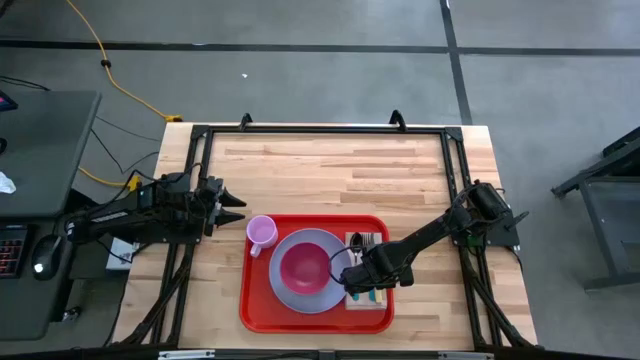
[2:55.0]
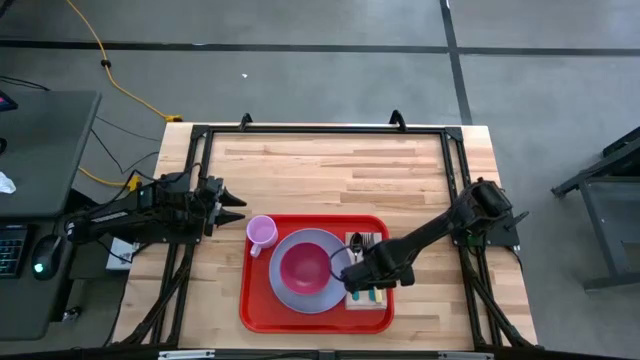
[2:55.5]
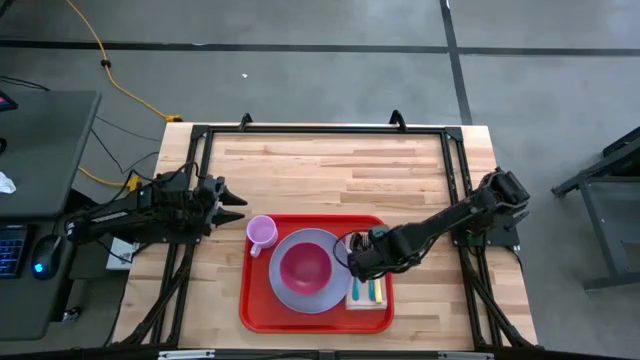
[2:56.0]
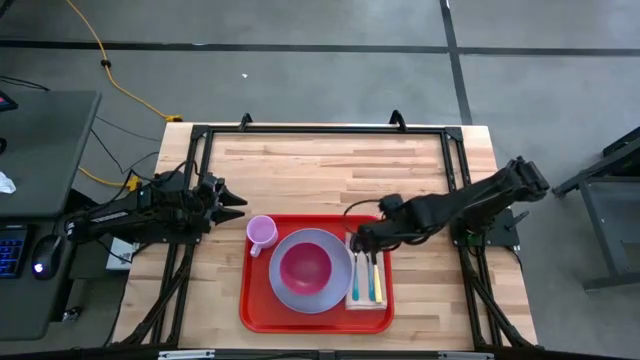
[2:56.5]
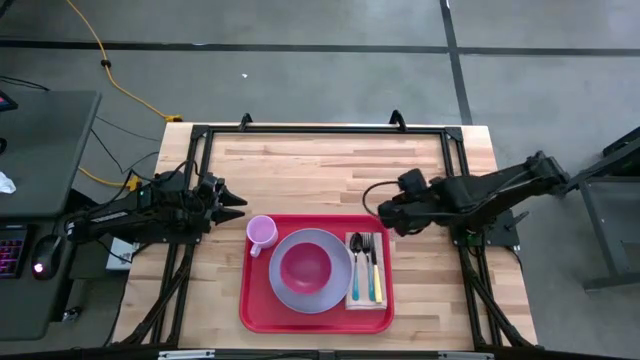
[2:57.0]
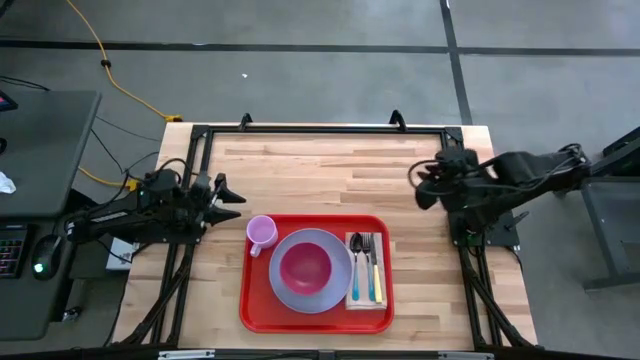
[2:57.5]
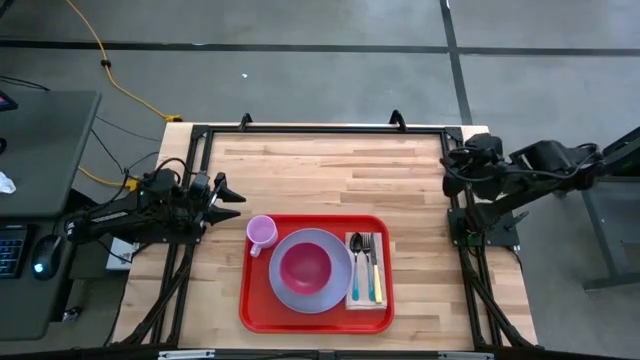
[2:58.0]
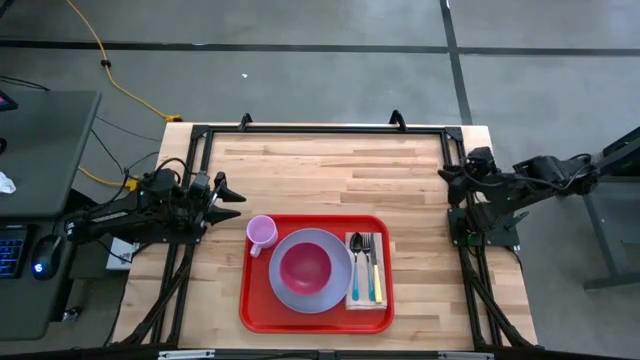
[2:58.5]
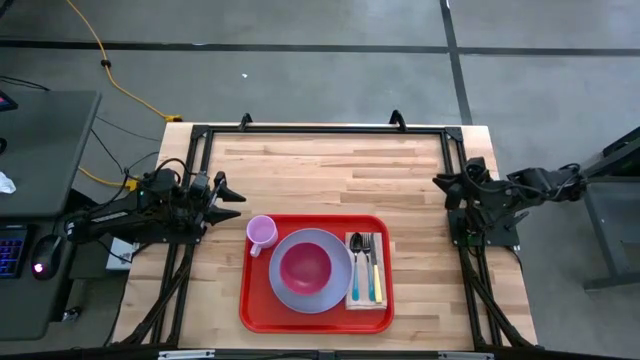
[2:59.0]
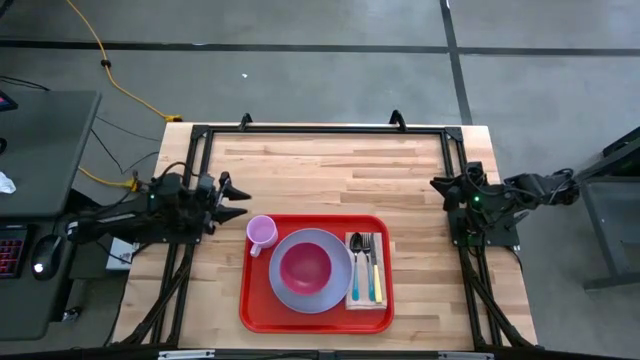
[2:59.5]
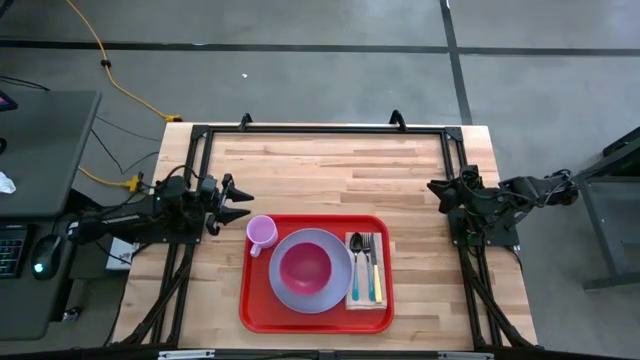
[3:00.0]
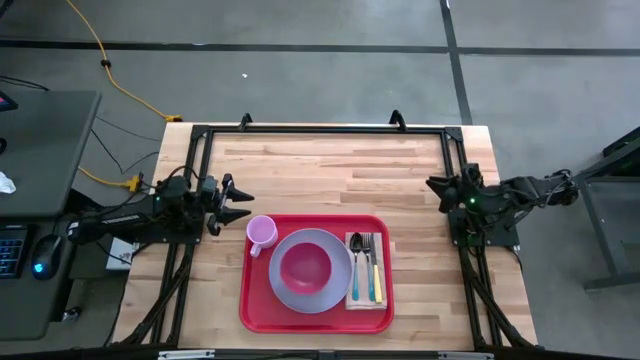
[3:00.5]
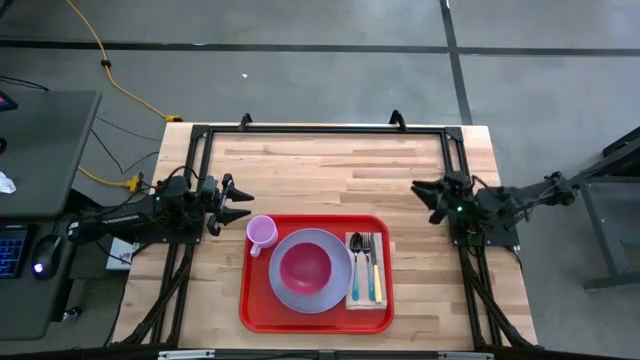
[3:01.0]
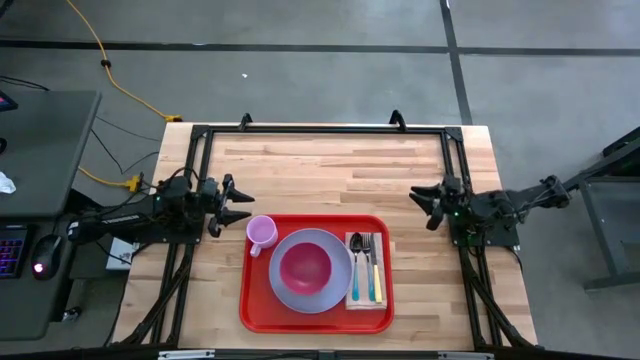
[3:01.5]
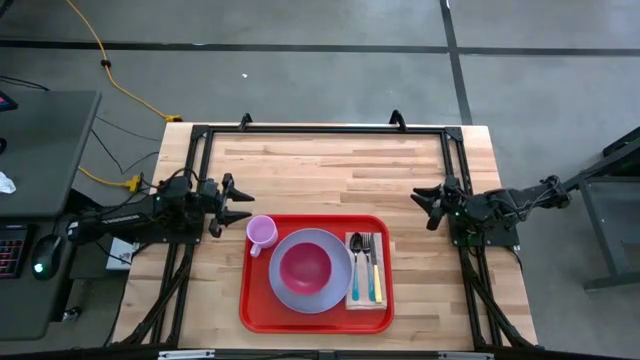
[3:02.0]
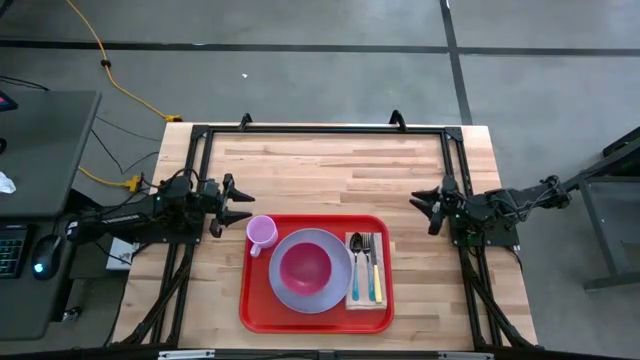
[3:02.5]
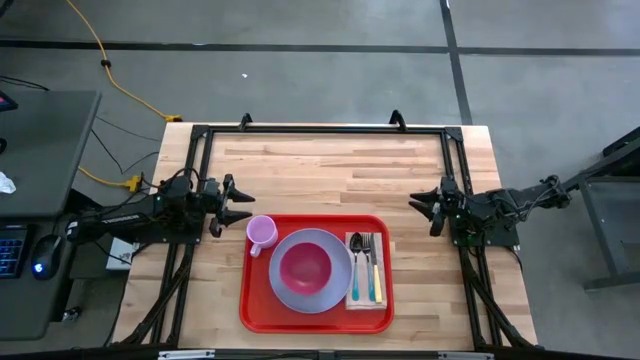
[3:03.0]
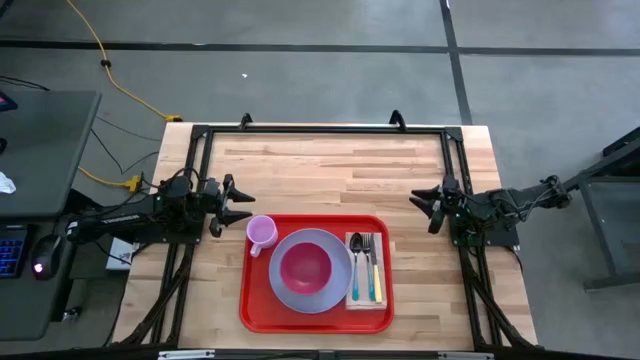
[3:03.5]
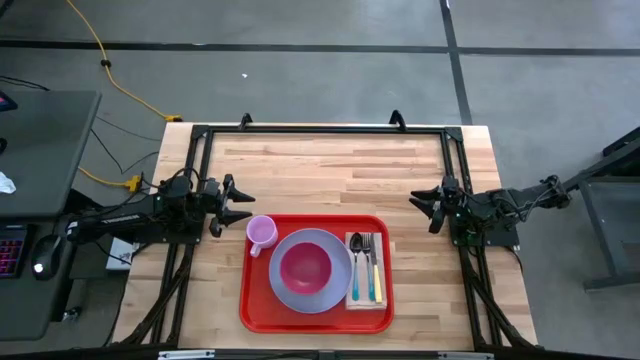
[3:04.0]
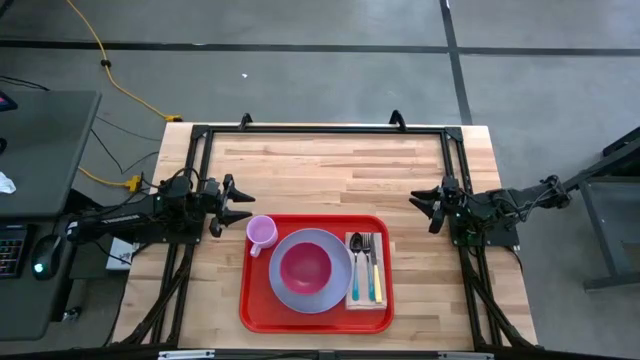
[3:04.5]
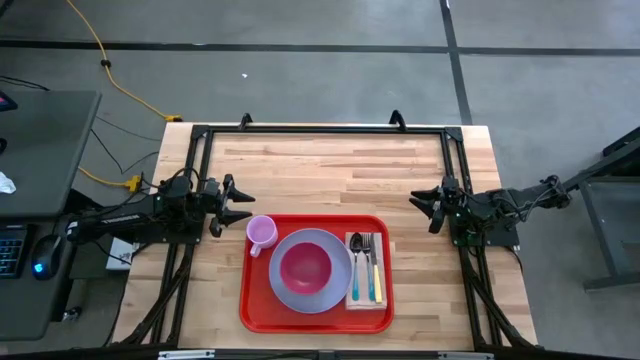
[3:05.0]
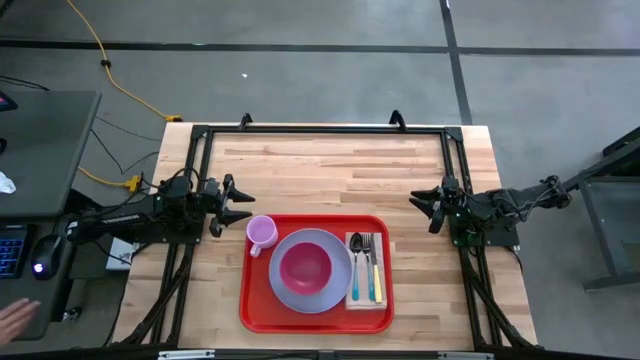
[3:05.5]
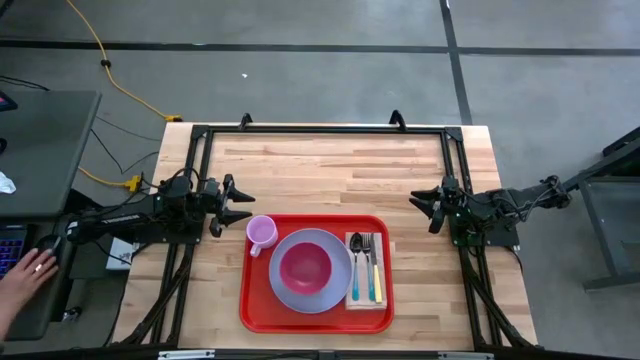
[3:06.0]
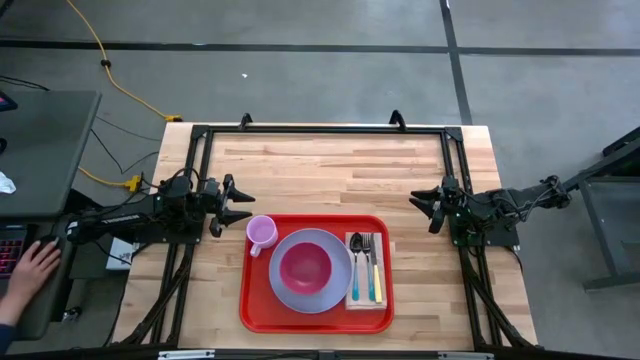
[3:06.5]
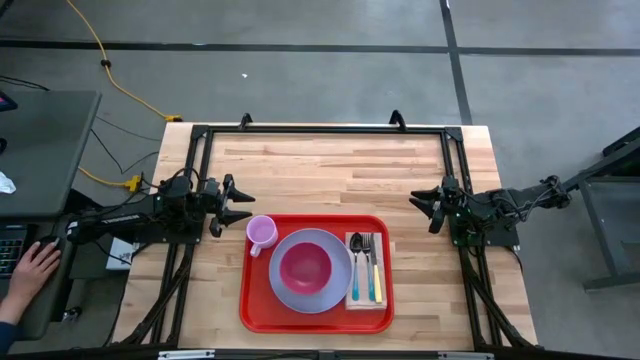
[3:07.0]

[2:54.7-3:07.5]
Task: Set up tray
Return to Home Position

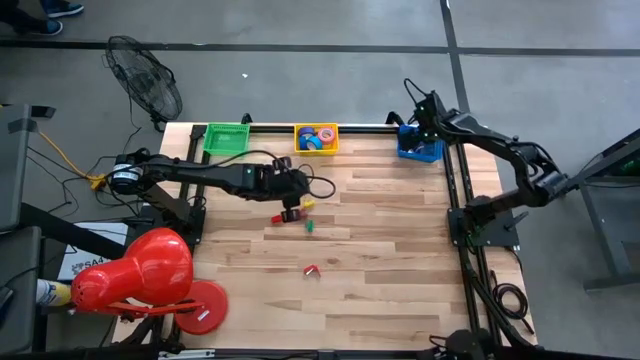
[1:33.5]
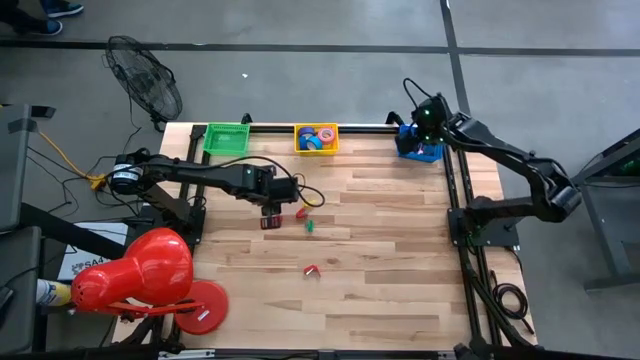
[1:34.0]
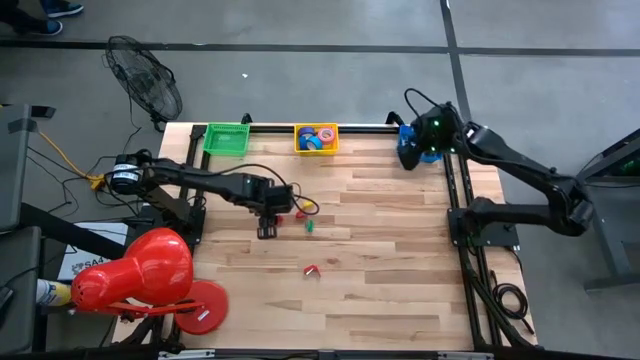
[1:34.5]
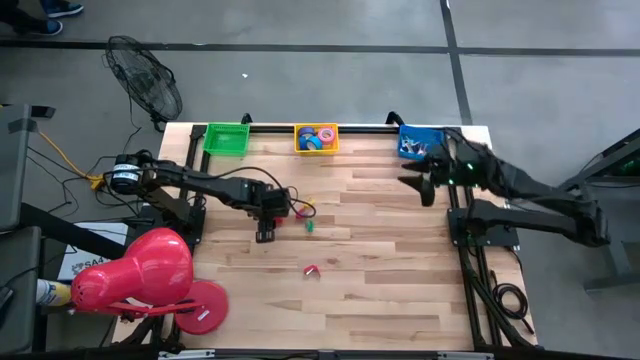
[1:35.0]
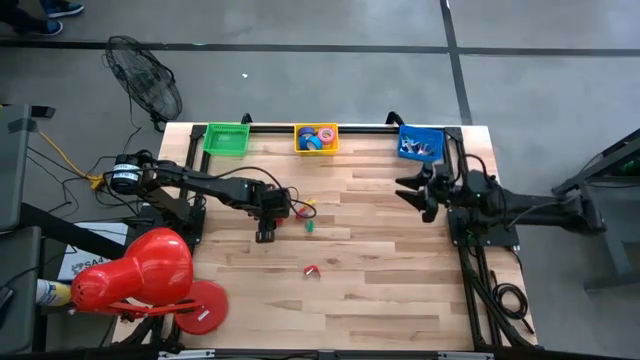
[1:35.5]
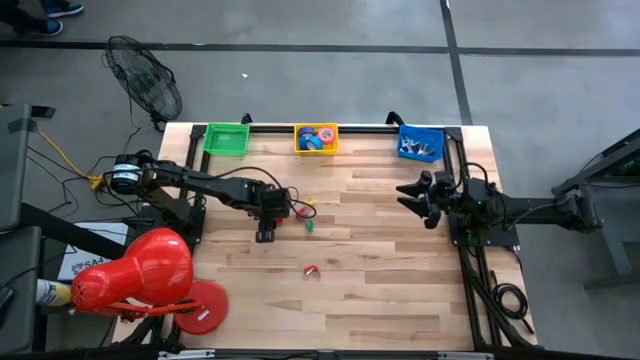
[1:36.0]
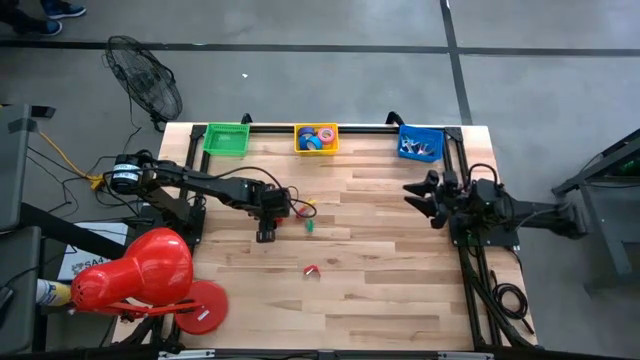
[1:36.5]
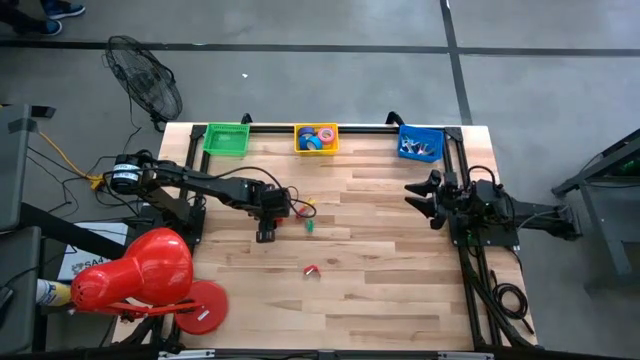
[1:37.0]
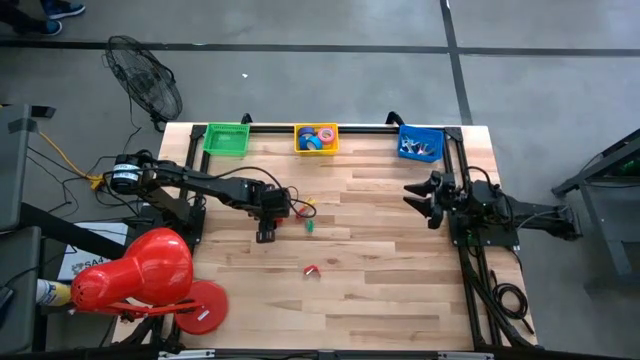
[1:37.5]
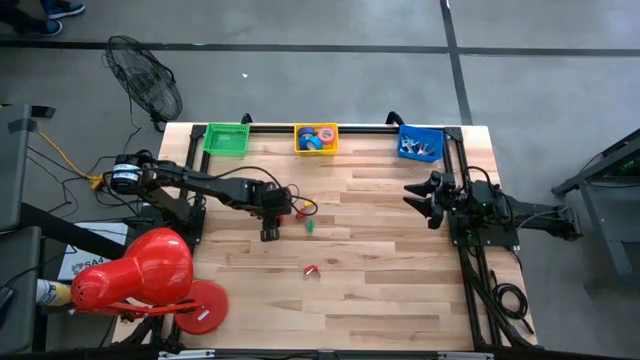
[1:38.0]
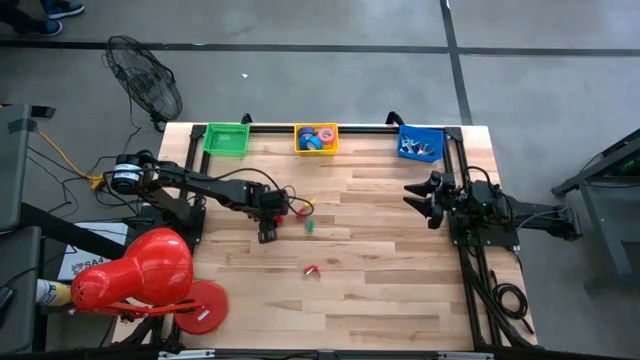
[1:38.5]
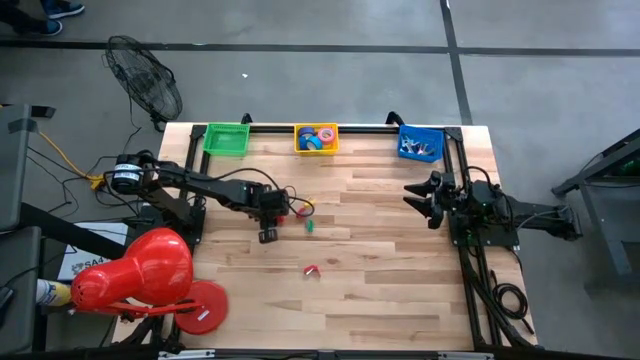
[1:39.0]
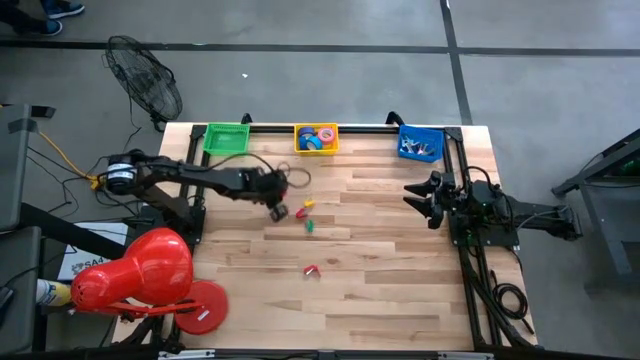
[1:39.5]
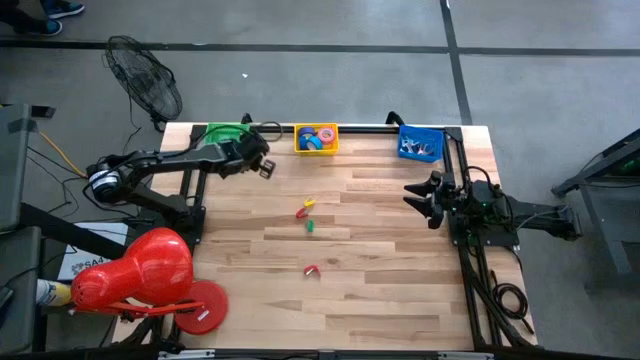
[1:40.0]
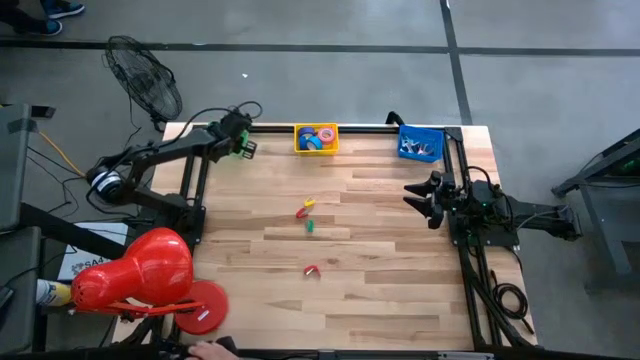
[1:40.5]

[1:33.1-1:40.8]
Task: Pick and place Stapler, Stapler remover, tape
Put the red stapler into the green bin

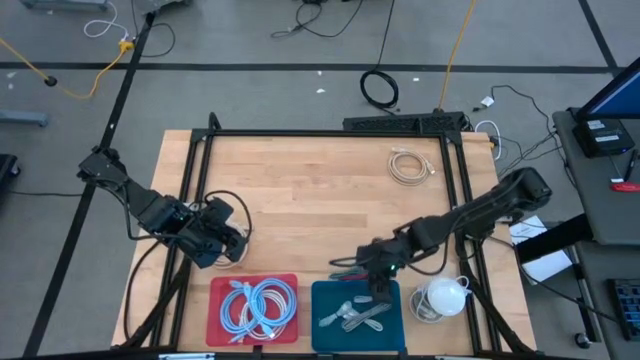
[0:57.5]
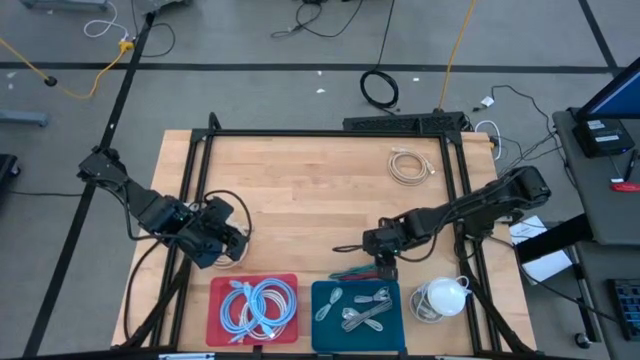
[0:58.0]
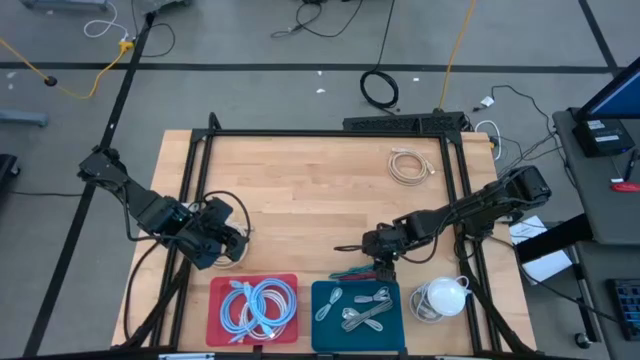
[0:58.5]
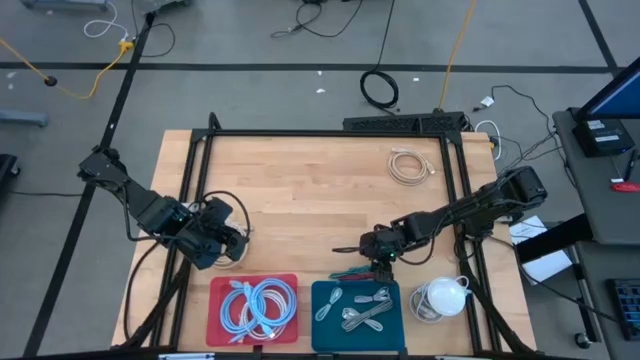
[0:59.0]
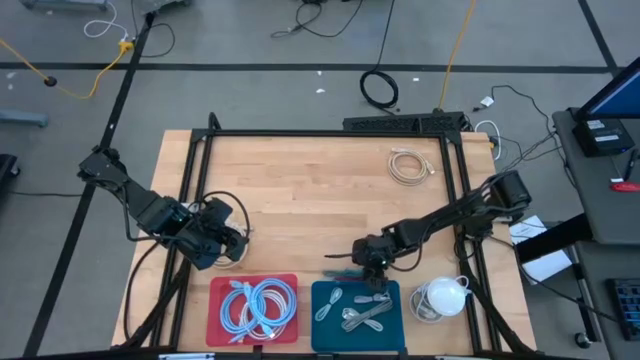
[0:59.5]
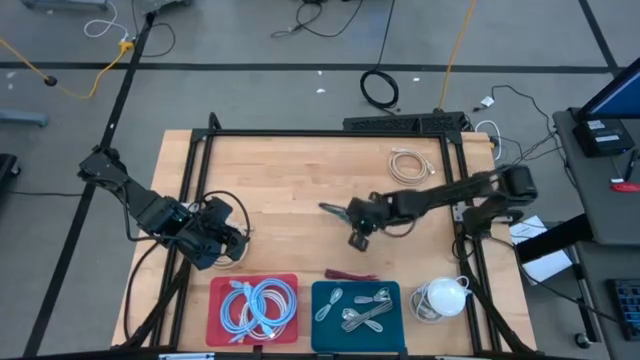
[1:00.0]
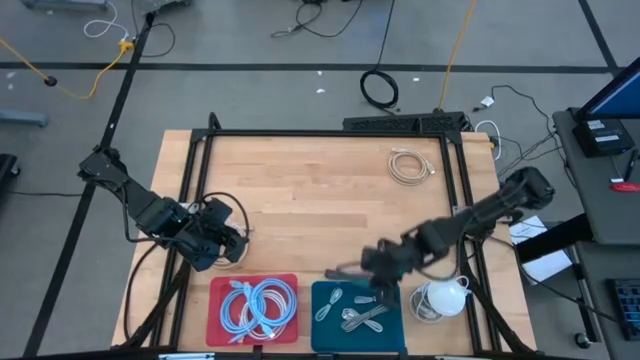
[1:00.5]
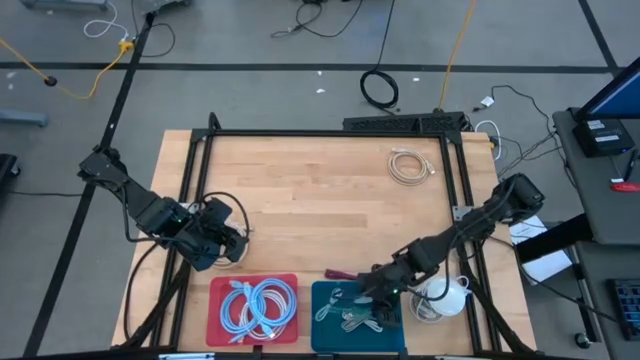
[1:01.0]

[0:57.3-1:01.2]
Task: Pick & Place USB Port
Put the black and green USB cable into the blue bin
